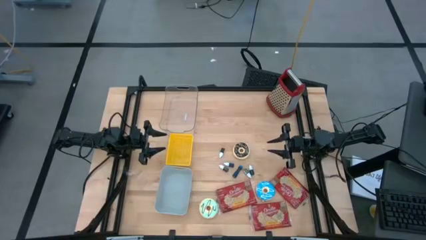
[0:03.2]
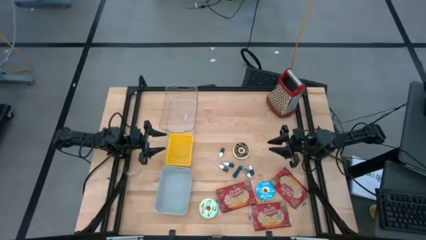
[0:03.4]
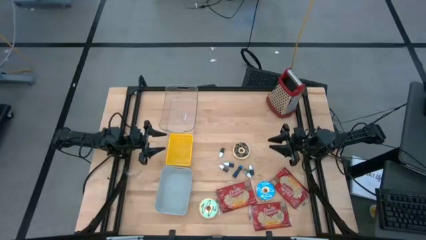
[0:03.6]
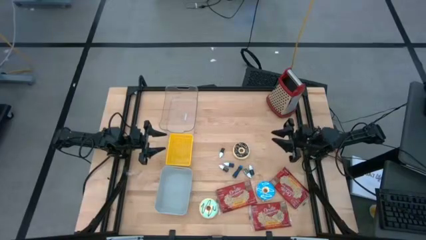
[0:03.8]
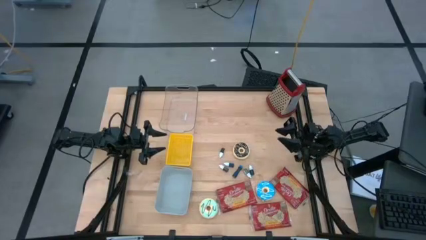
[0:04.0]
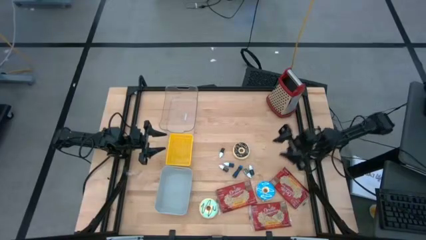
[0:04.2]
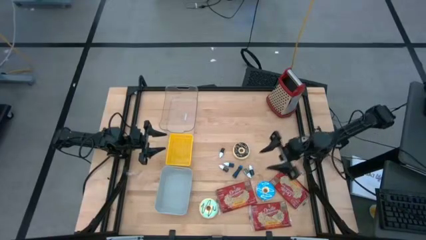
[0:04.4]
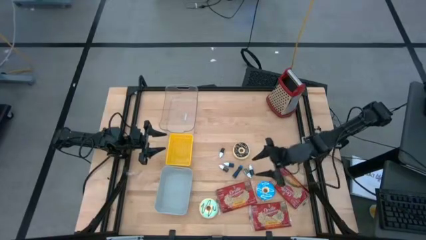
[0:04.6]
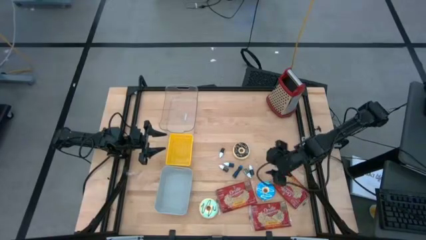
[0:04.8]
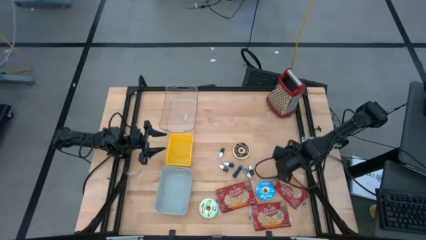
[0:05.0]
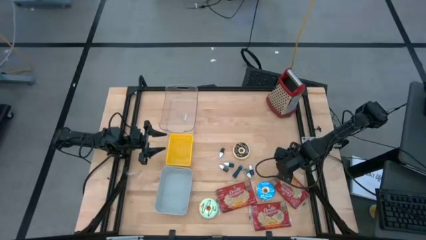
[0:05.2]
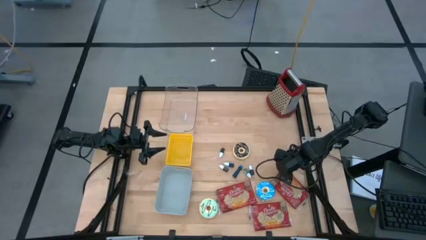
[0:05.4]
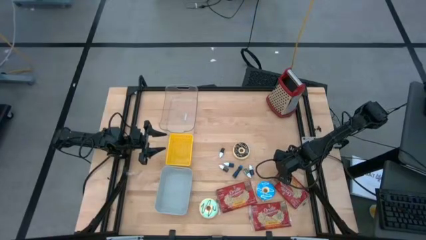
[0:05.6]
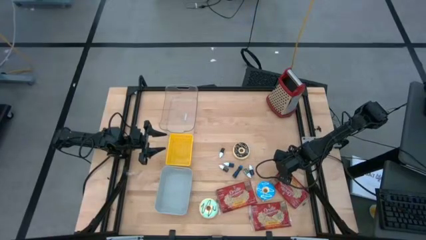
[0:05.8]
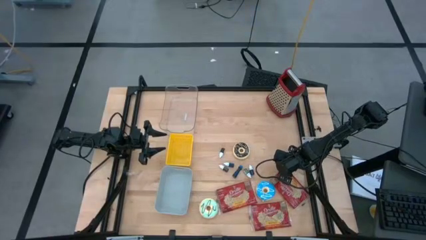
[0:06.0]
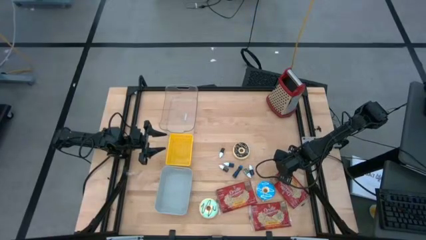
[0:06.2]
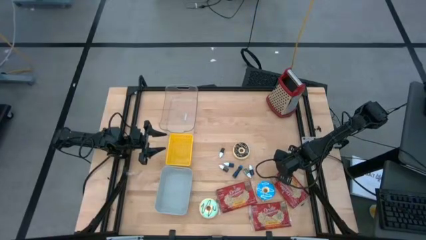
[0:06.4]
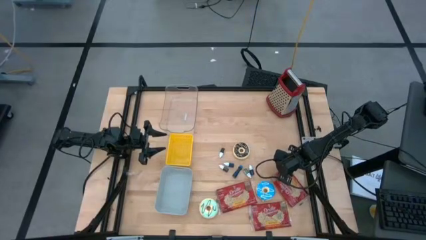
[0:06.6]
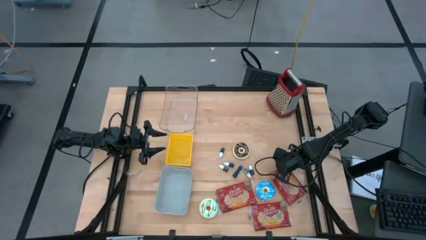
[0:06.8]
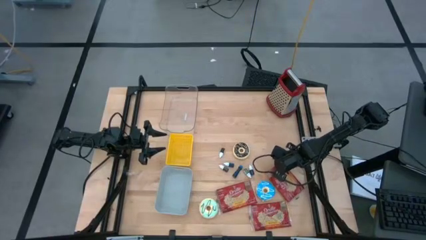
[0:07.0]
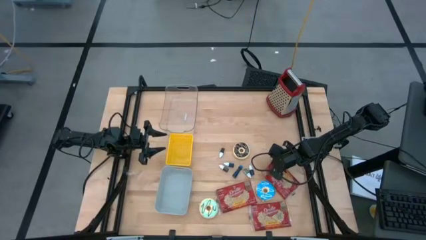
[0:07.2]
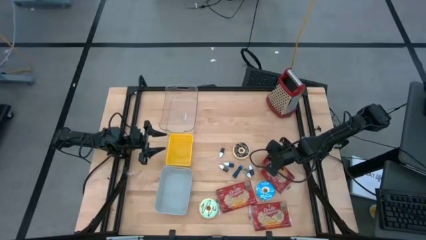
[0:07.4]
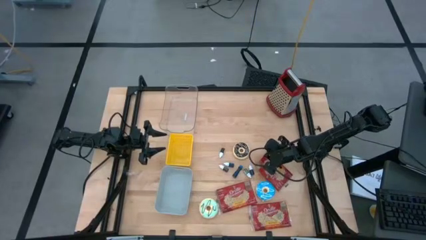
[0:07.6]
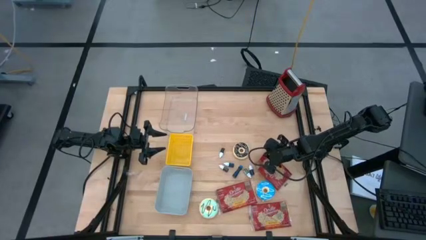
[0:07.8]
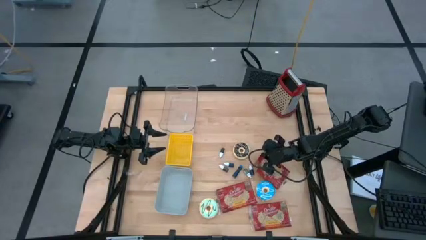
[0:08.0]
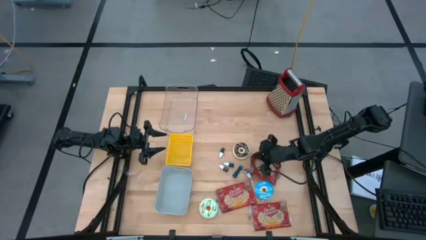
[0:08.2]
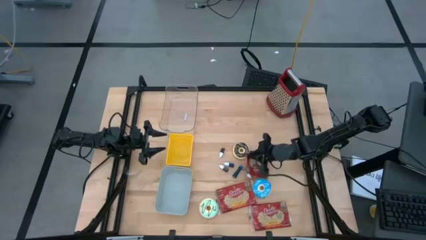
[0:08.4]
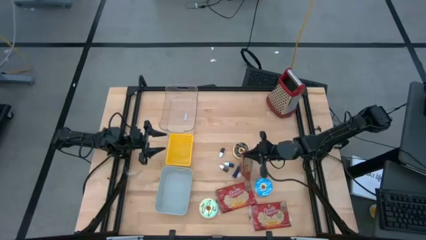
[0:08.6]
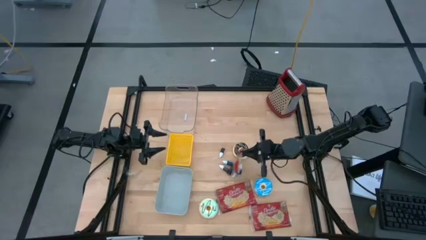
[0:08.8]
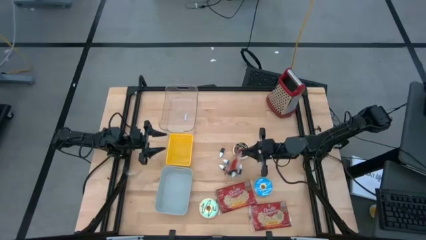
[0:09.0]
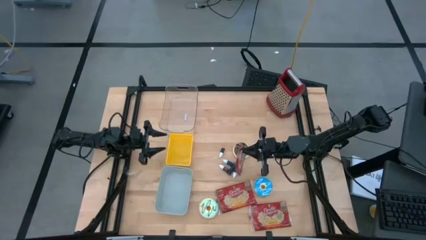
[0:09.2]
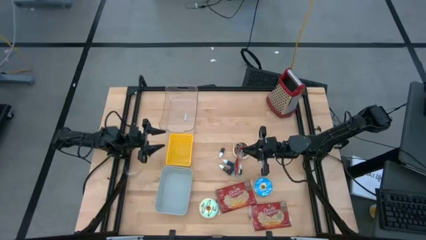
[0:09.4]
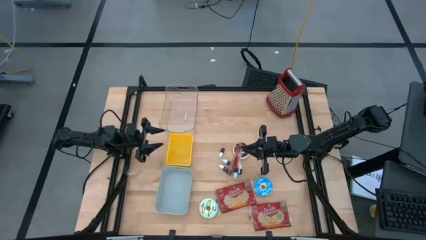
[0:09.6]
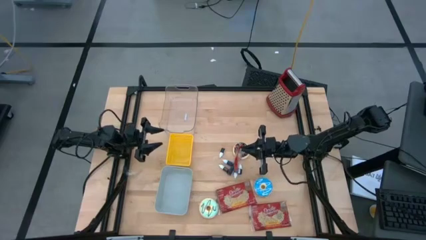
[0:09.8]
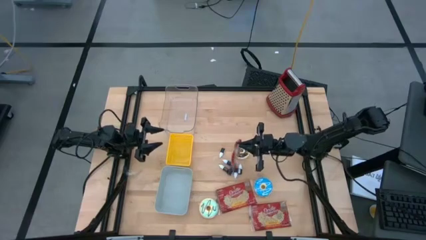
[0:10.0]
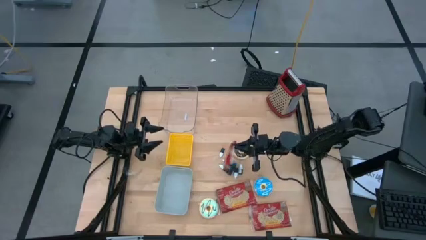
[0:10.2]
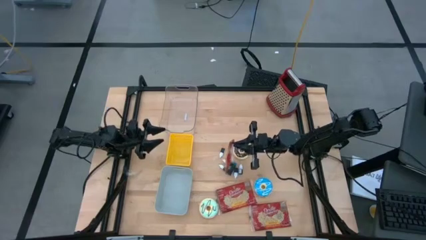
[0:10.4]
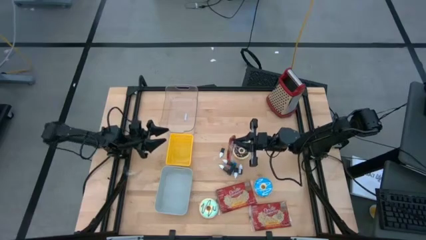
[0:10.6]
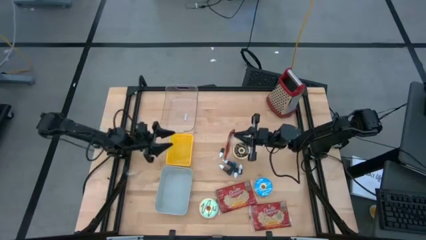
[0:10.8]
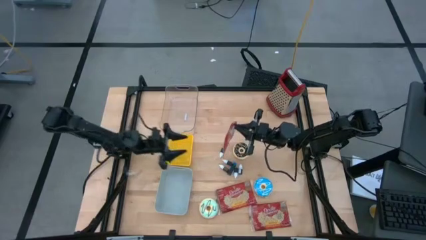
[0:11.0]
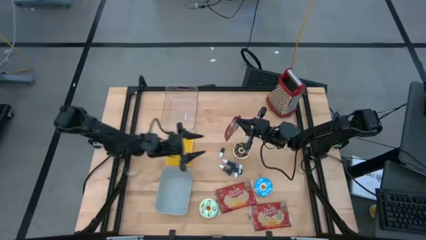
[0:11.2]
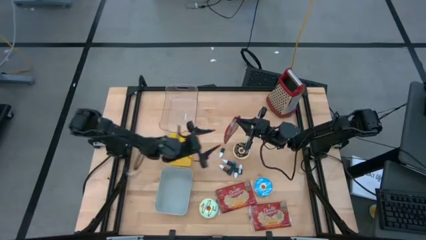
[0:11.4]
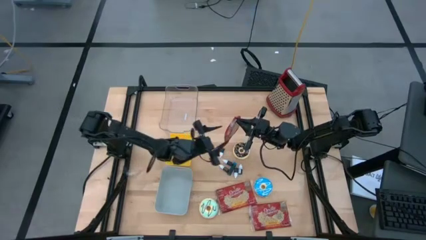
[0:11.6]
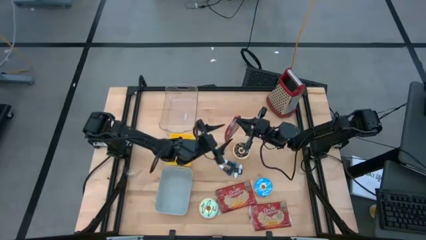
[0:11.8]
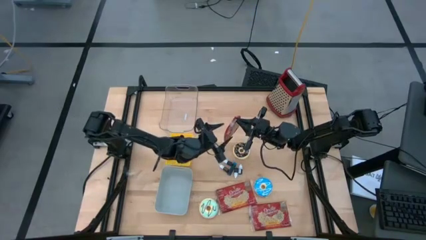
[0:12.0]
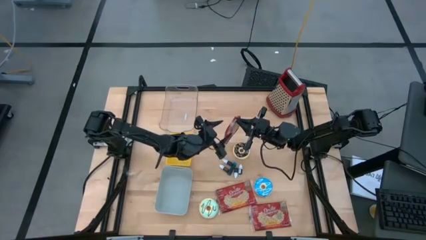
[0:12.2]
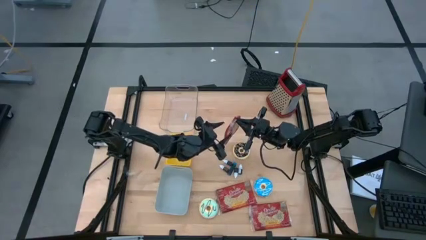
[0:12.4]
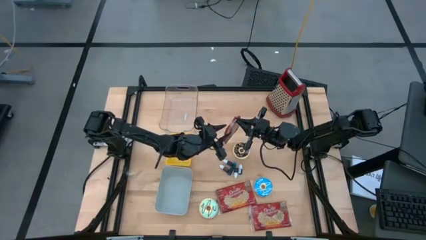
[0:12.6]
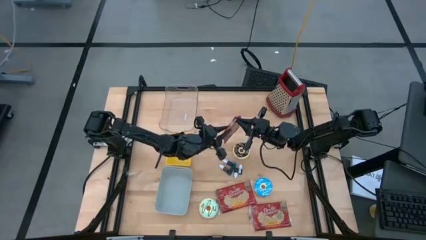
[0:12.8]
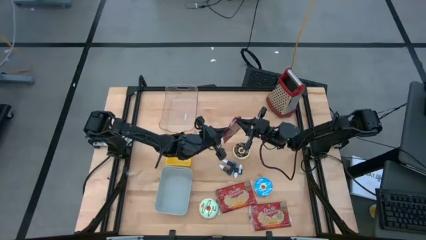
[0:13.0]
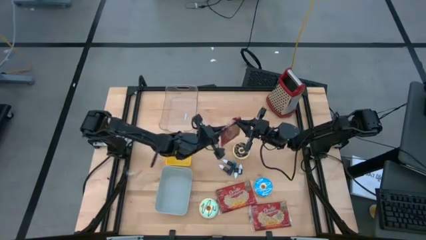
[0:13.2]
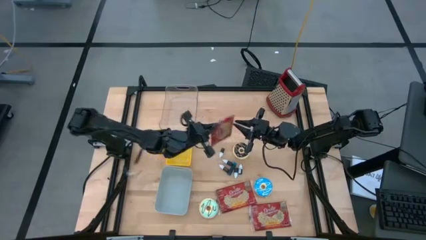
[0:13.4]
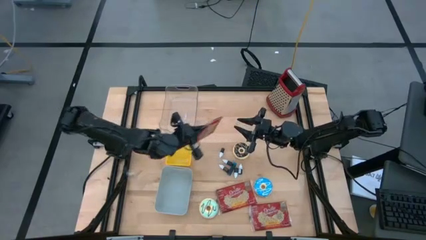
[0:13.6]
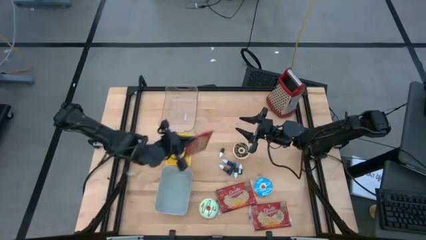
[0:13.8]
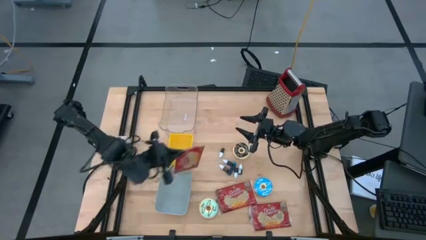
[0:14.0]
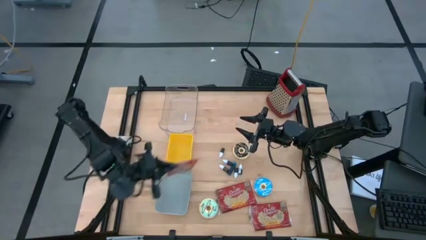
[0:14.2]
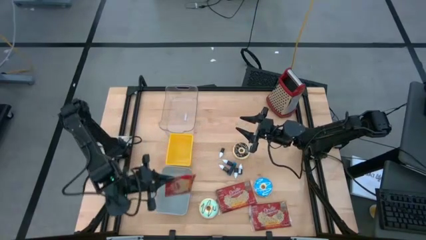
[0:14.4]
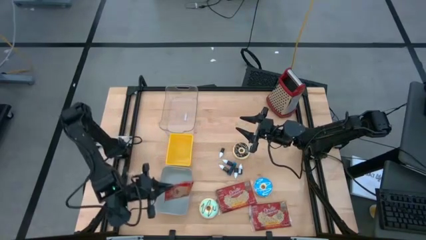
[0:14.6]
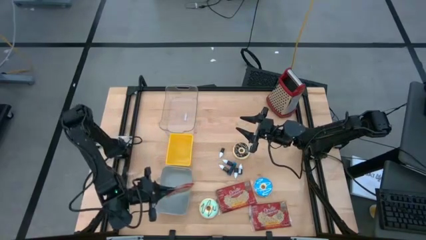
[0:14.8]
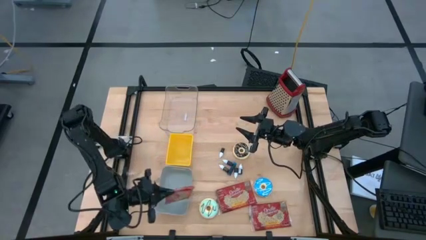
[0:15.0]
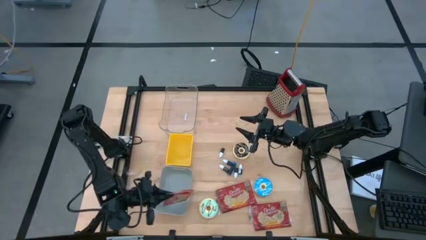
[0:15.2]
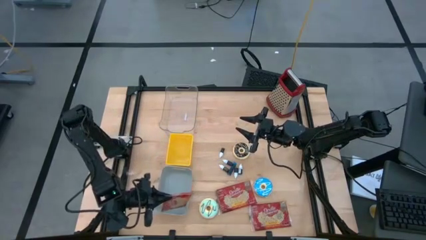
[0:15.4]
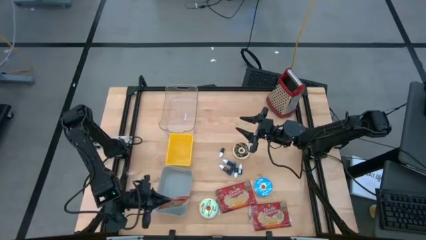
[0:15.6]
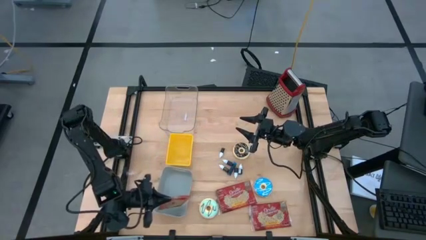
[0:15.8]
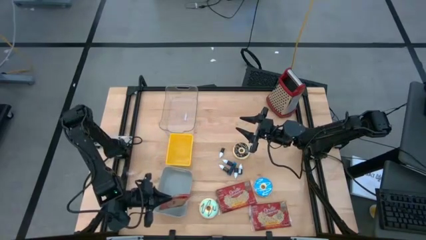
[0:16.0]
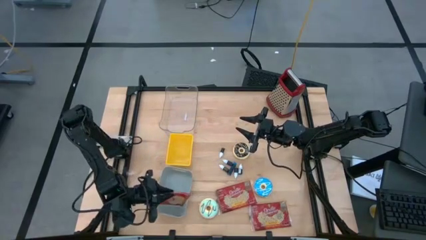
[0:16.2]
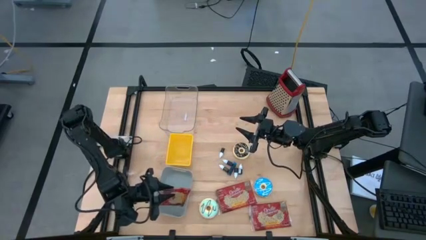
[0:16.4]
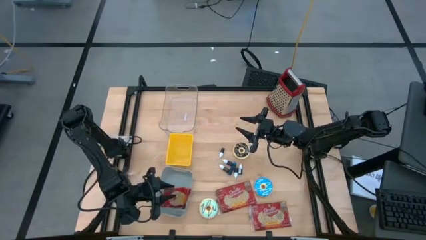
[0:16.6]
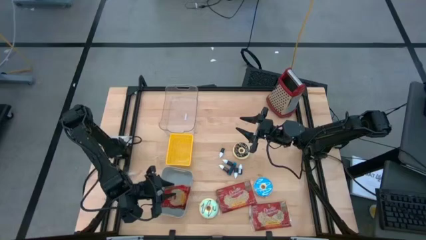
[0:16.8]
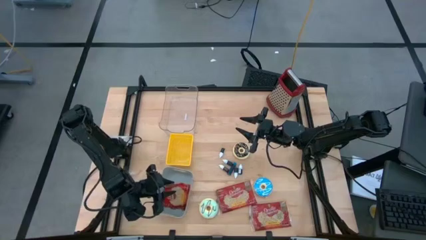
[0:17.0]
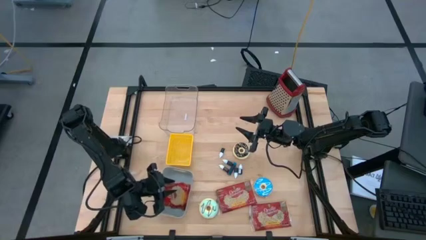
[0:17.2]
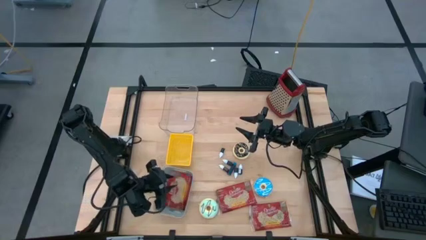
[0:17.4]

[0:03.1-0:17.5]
Task: Pick & Place Food Item
Put the top right red popcorn bag into the white bin
